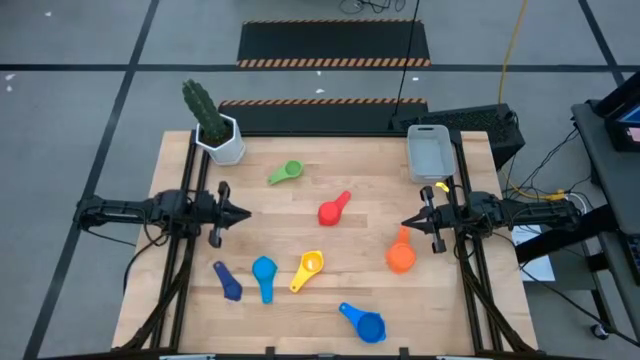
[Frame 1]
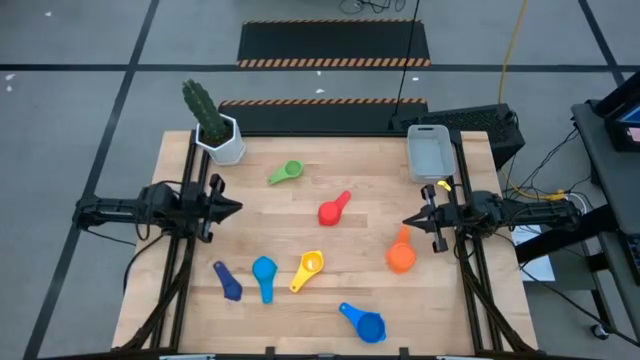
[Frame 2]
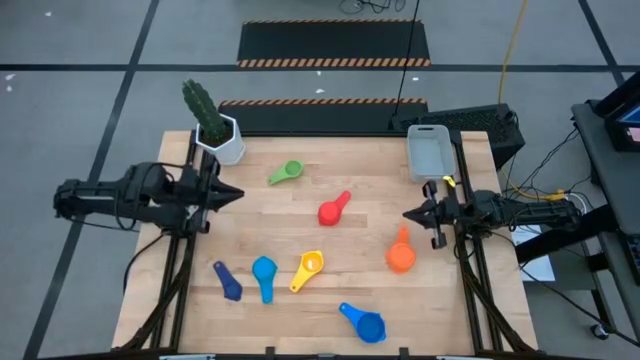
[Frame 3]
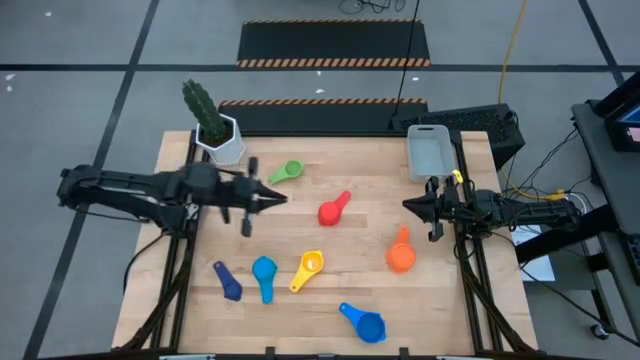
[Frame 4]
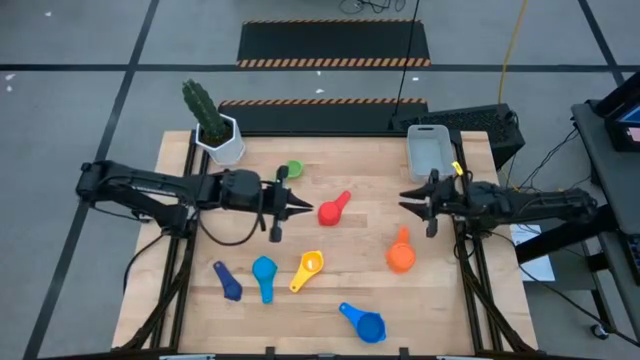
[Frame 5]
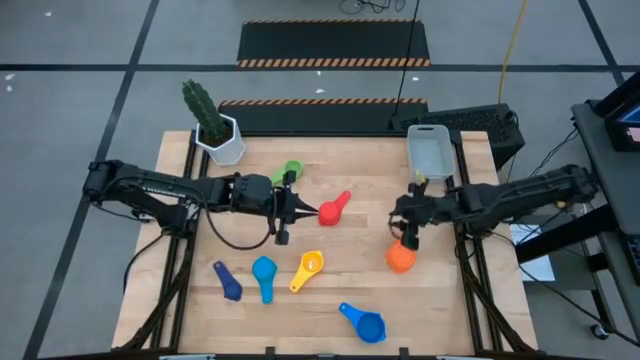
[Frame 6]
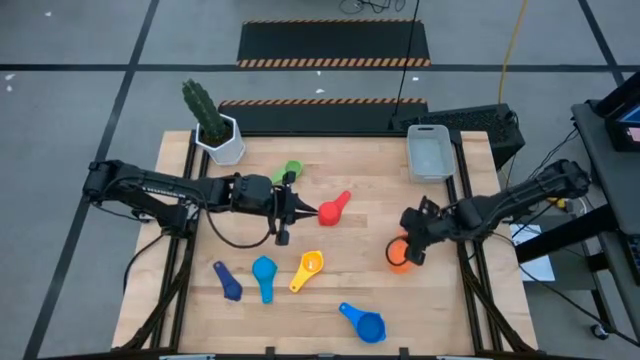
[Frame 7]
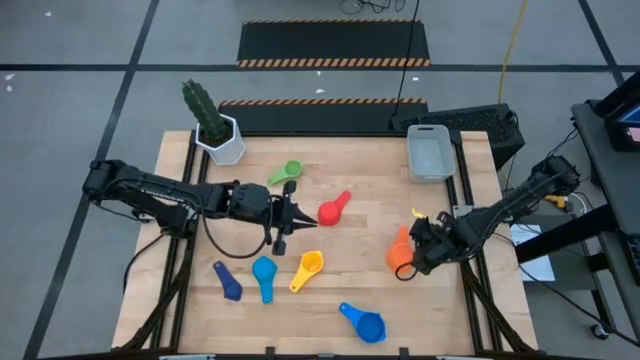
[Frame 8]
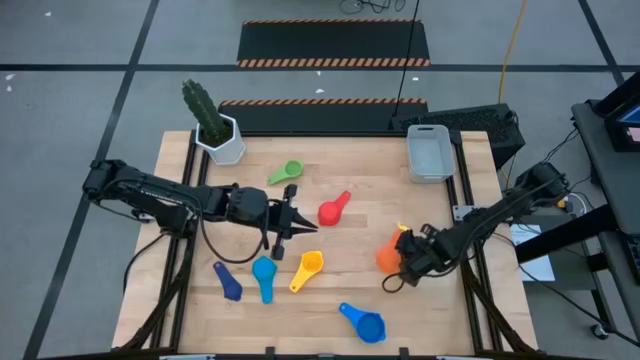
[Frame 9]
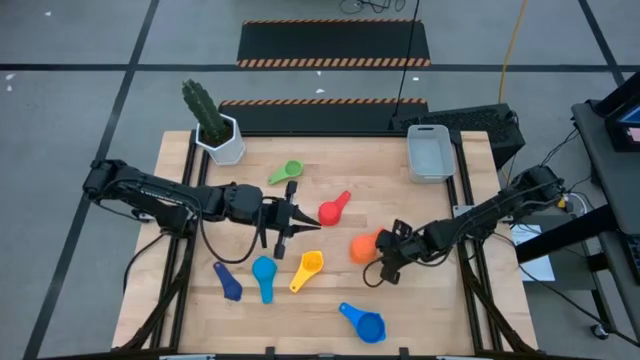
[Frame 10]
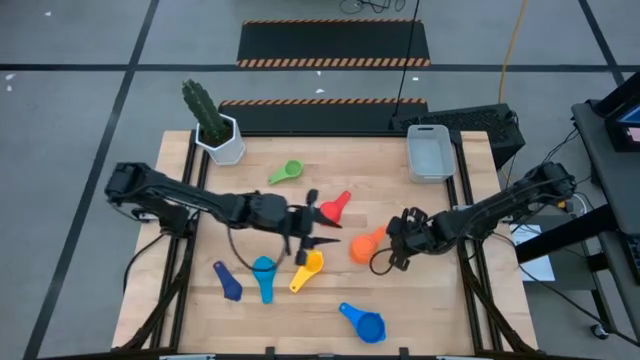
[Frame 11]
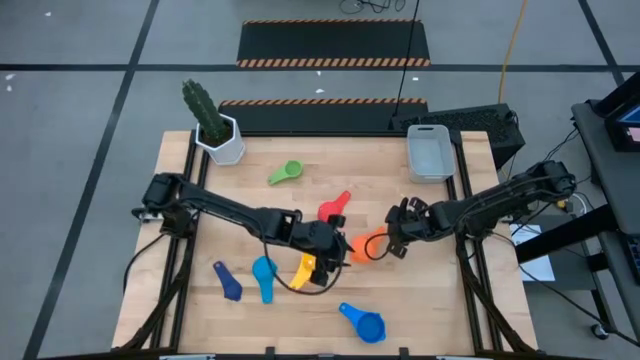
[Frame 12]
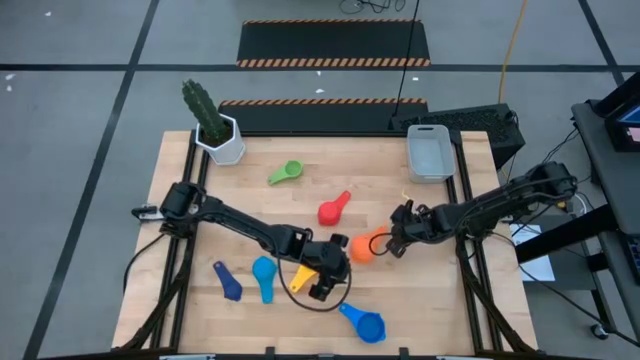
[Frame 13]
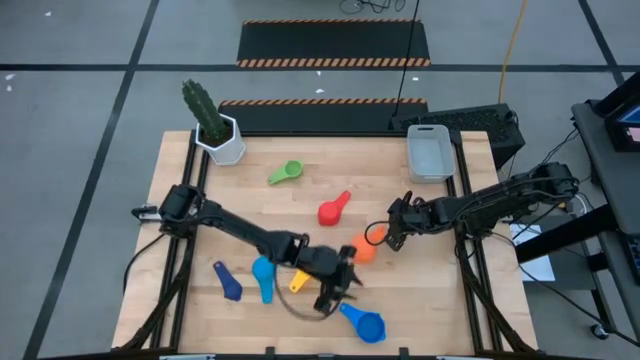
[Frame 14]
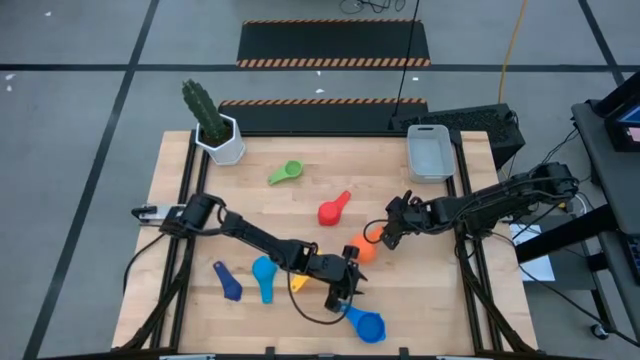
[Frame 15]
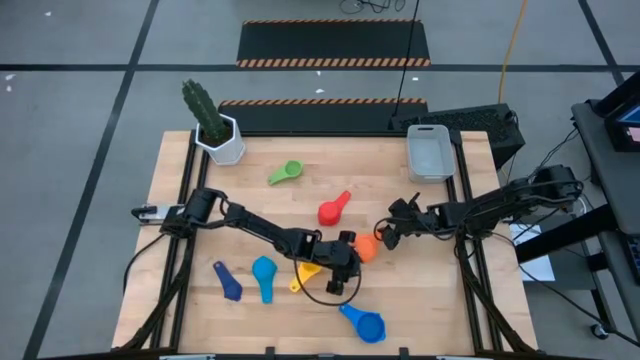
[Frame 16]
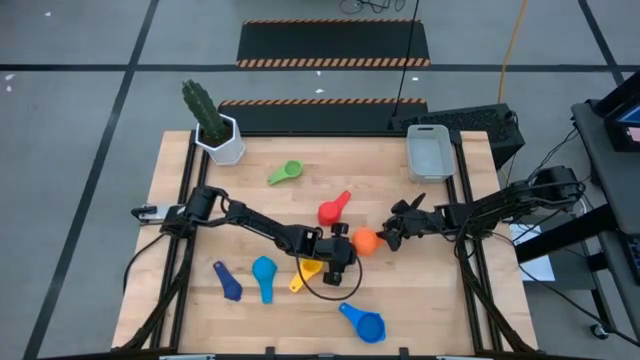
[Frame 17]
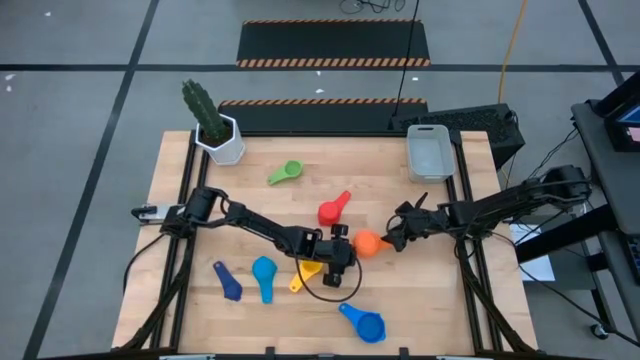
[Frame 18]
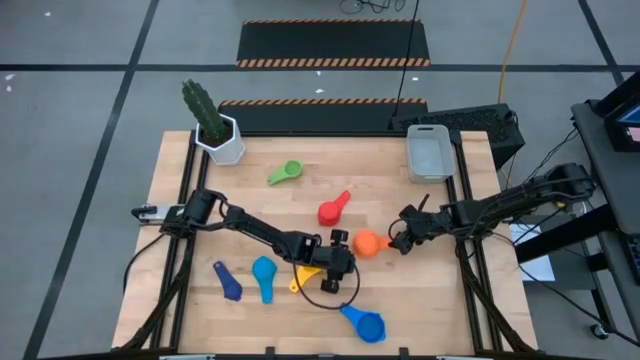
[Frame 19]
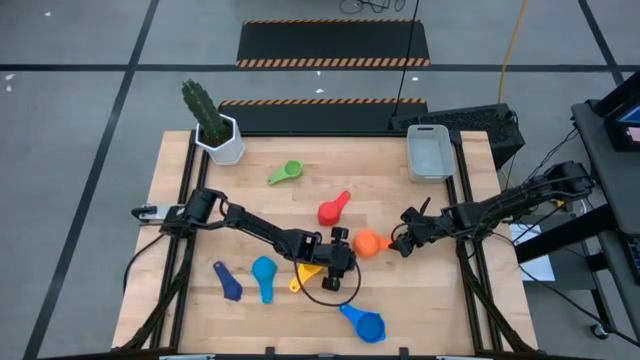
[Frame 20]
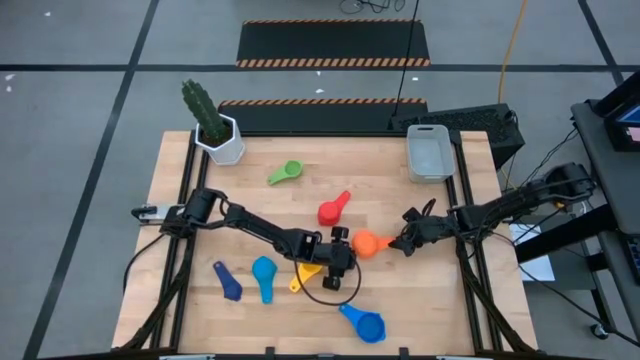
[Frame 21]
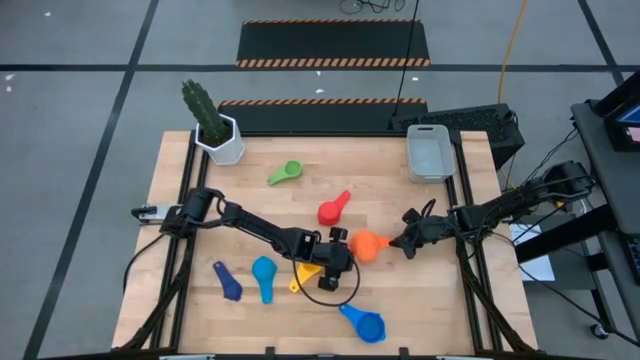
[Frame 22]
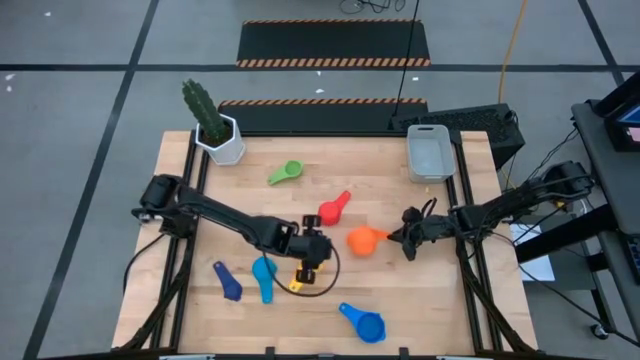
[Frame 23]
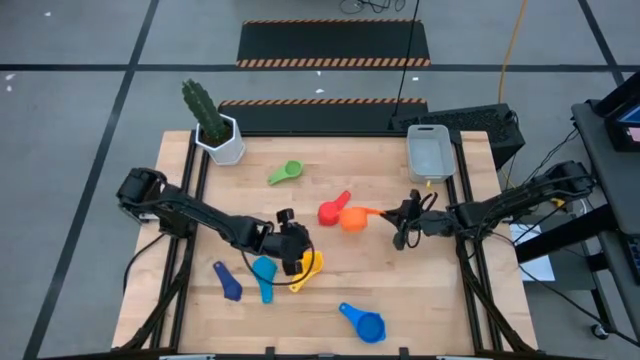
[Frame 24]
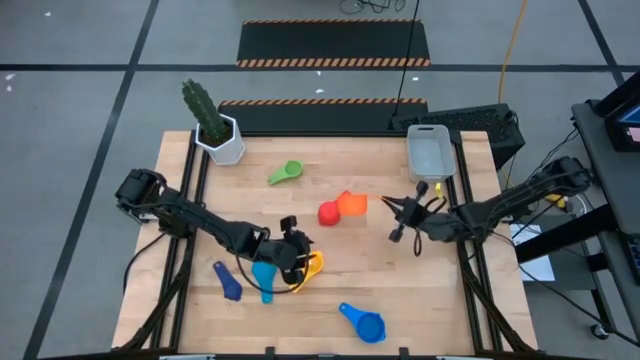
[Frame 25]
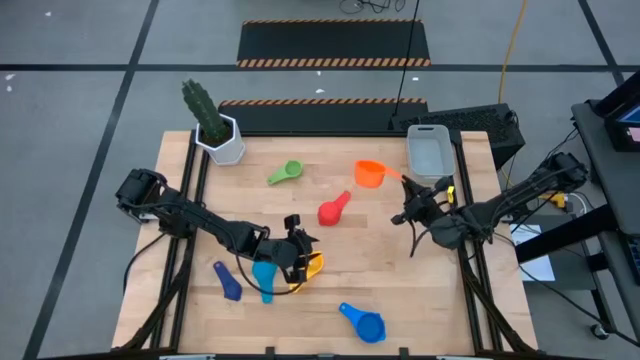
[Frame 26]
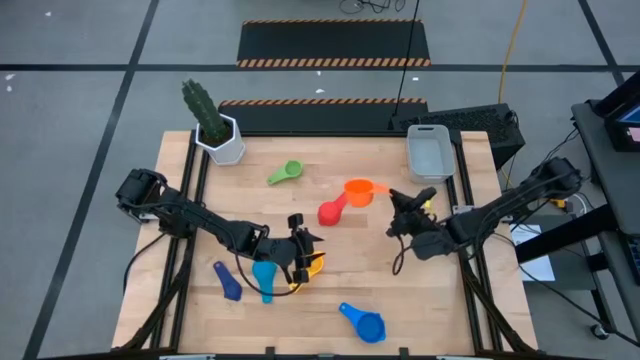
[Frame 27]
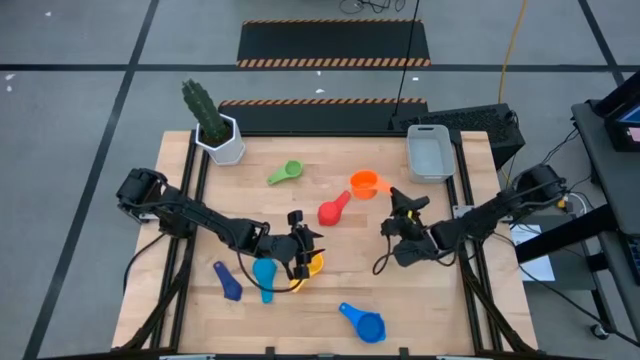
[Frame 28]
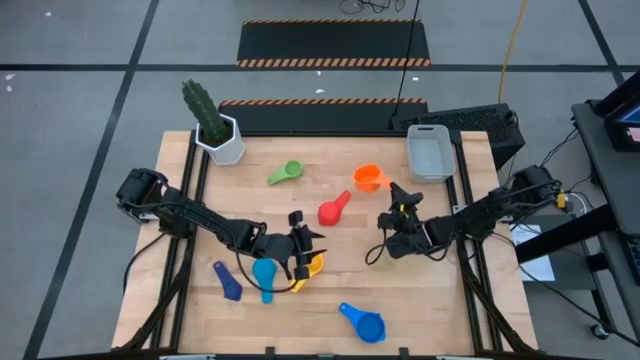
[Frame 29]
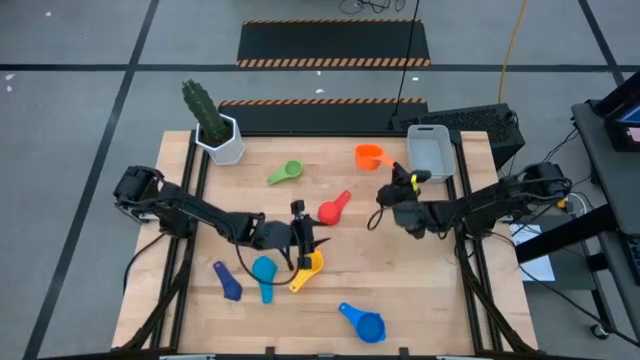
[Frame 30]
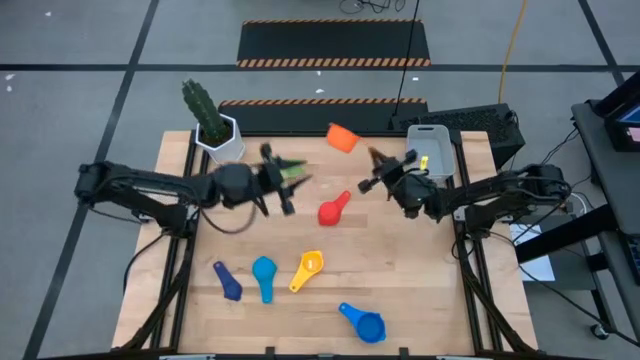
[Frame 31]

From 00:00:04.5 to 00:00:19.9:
Task: Nest measuring cups in basket
Put the orange measuring cup in the gray bin

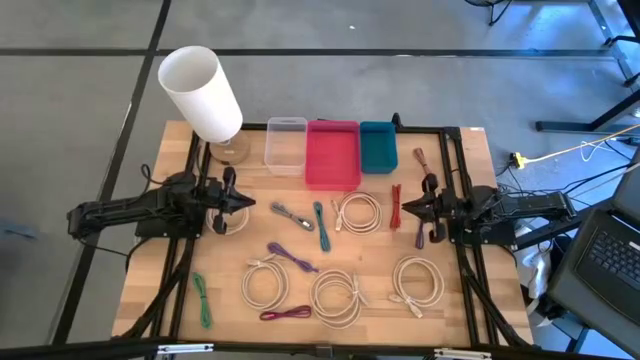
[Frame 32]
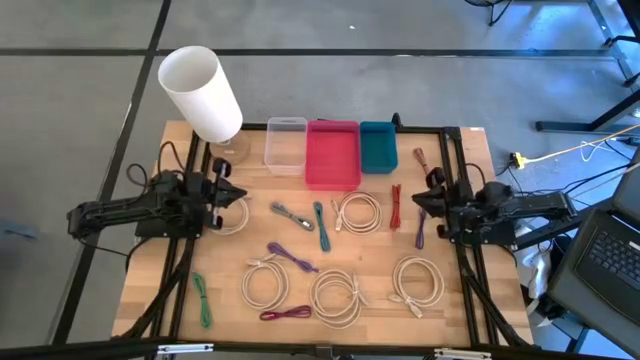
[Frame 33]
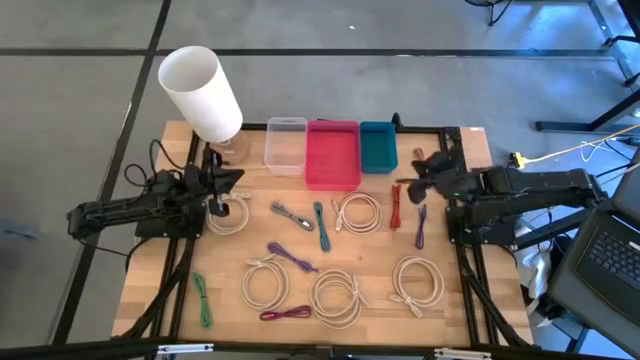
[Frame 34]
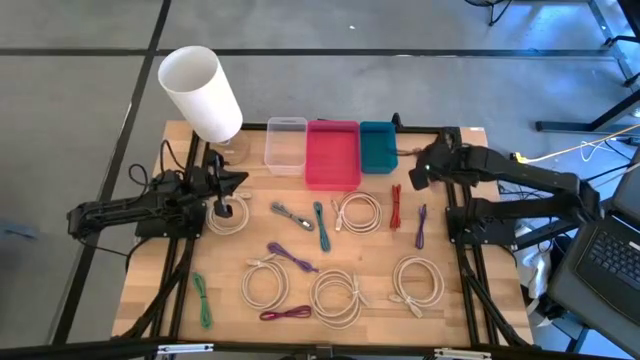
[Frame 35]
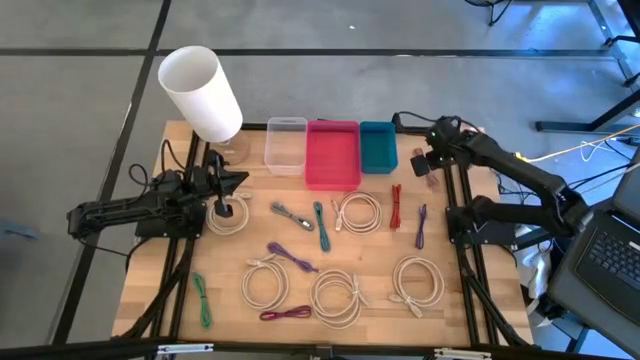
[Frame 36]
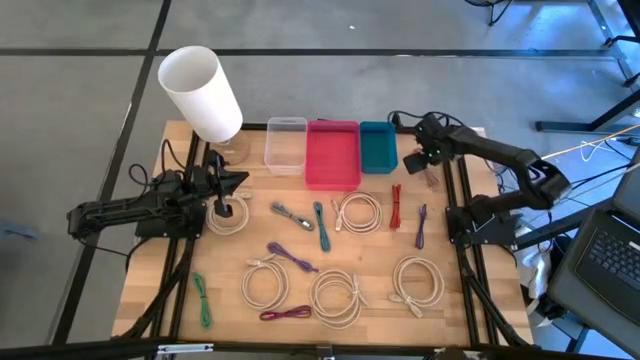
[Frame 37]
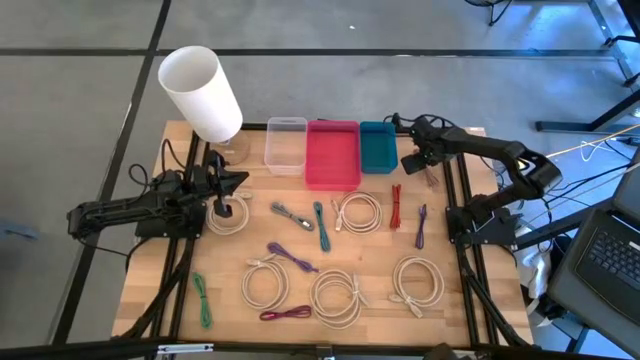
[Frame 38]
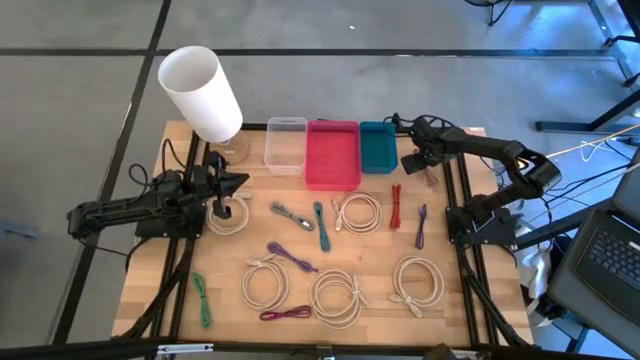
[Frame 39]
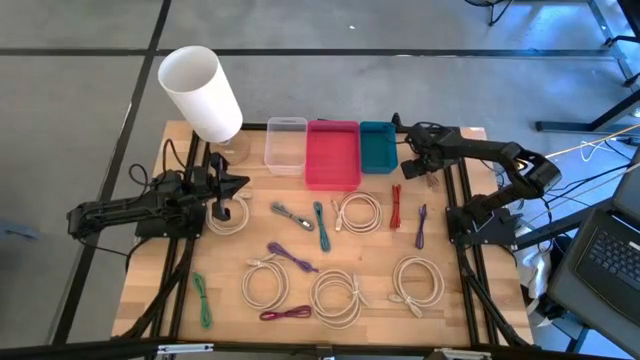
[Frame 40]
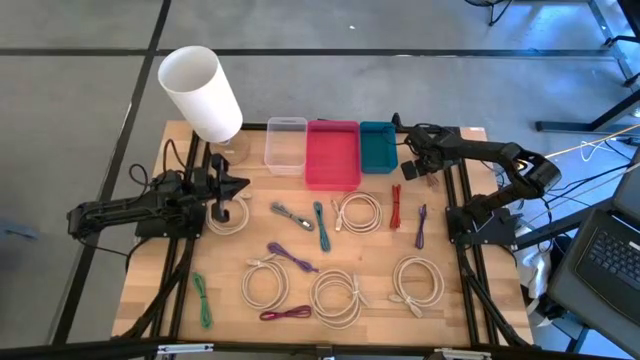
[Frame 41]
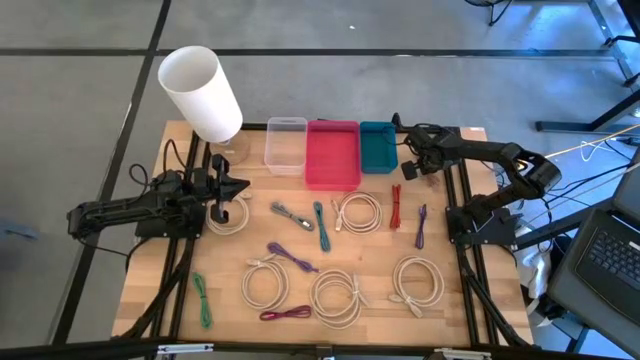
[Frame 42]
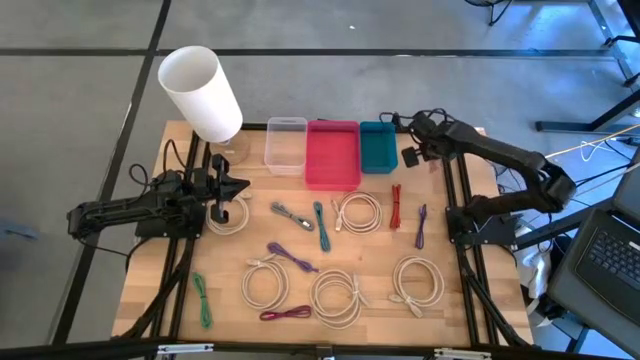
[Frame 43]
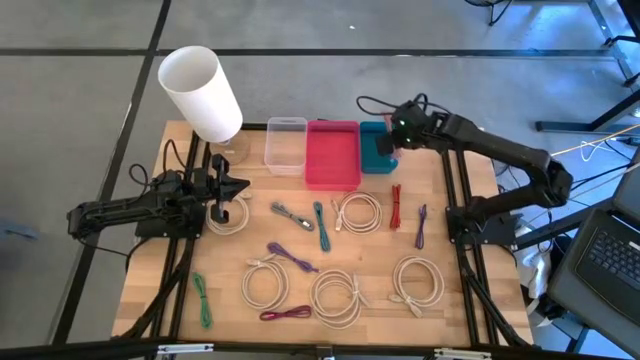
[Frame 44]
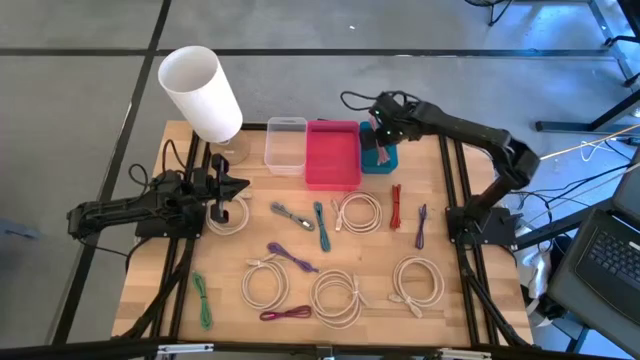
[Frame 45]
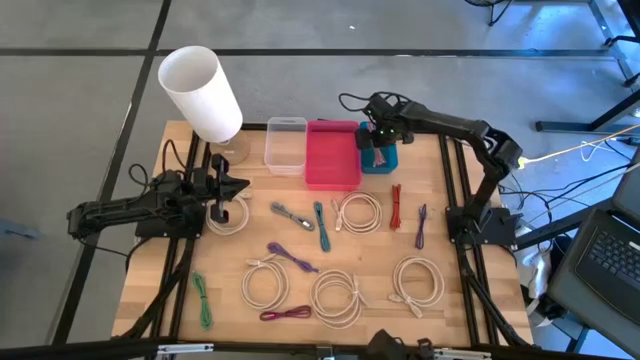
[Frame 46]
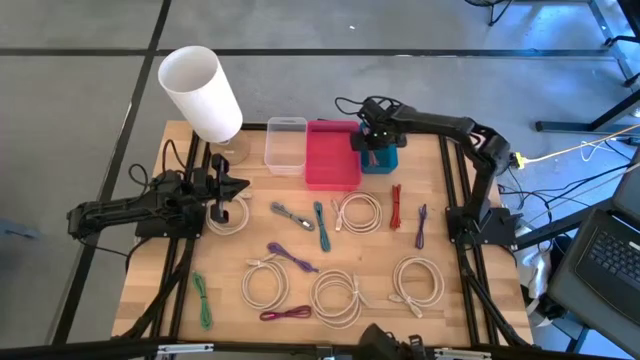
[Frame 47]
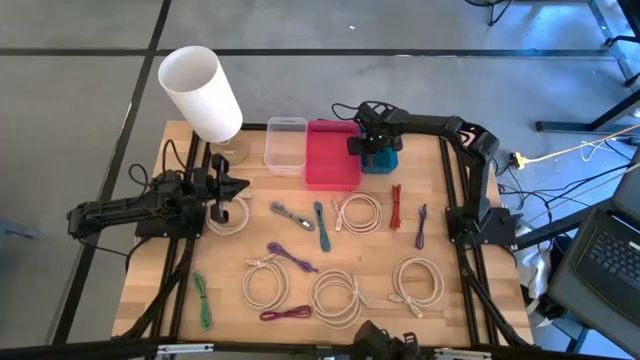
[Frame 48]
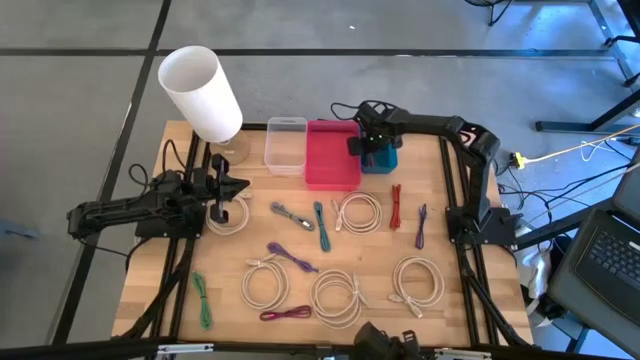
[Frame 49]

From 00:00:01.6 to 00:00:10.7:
Task: Pick & Place USB Port
Put the pink charger cable into the blue bin
